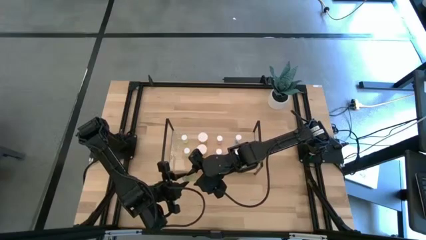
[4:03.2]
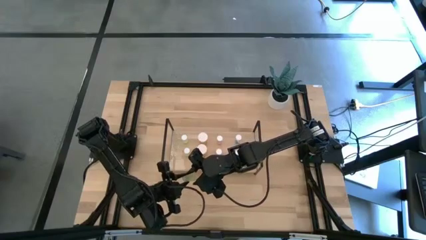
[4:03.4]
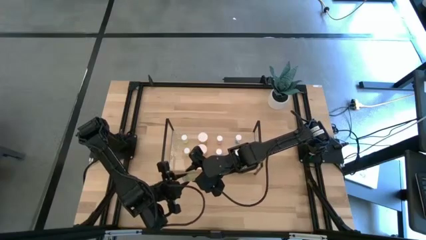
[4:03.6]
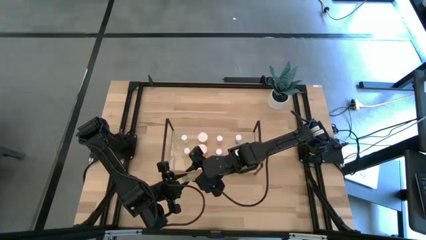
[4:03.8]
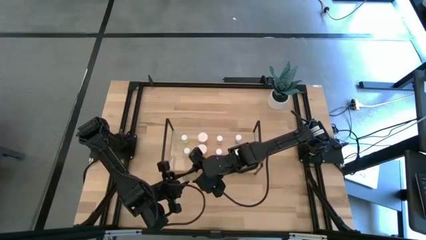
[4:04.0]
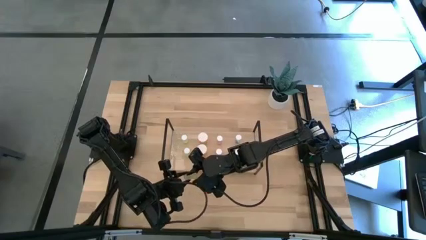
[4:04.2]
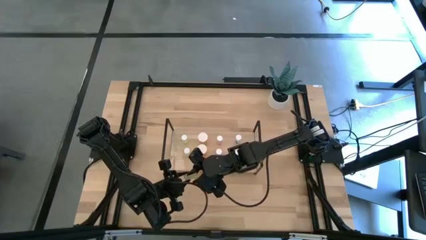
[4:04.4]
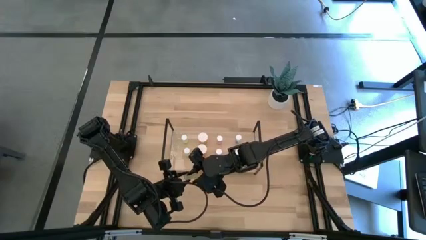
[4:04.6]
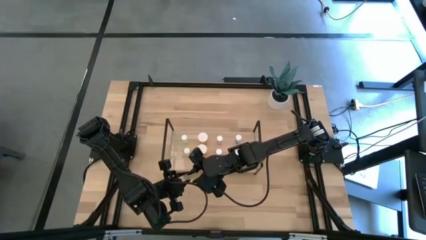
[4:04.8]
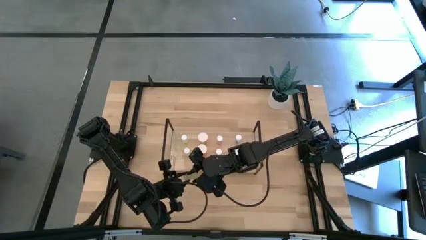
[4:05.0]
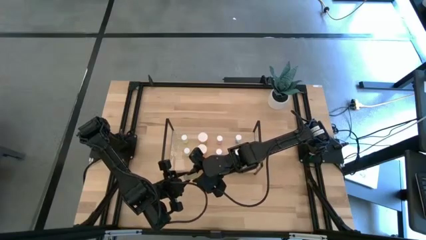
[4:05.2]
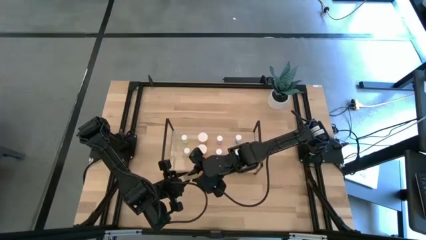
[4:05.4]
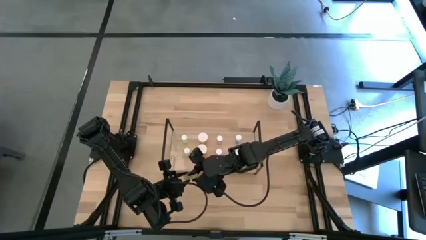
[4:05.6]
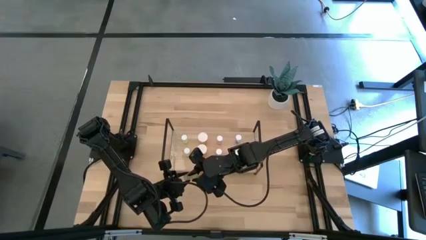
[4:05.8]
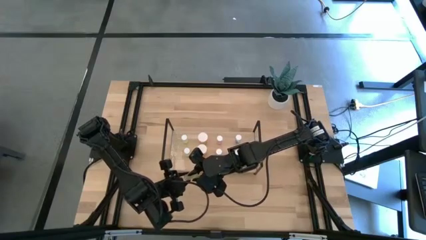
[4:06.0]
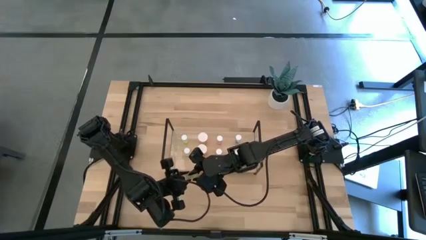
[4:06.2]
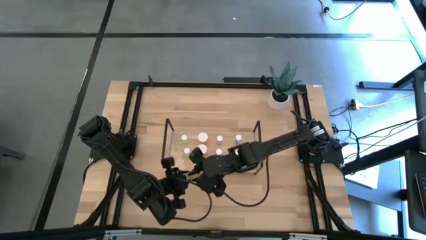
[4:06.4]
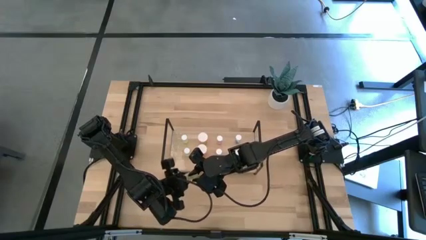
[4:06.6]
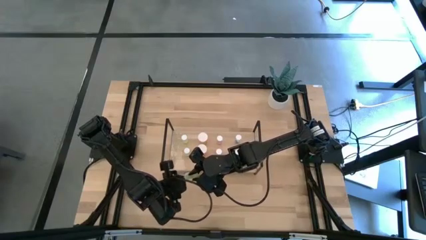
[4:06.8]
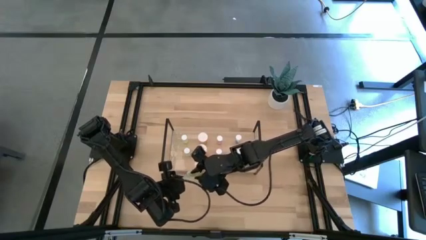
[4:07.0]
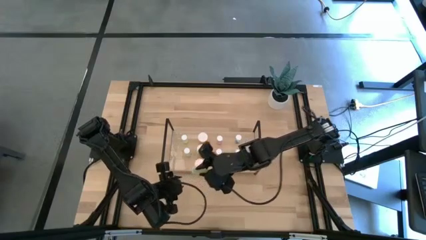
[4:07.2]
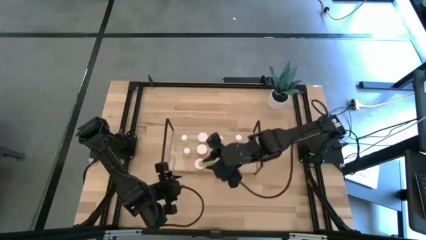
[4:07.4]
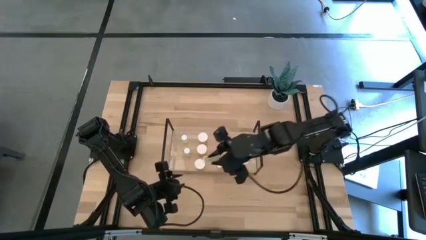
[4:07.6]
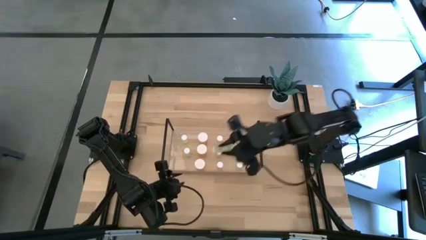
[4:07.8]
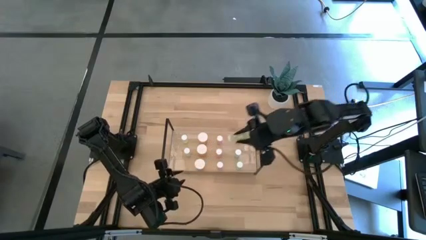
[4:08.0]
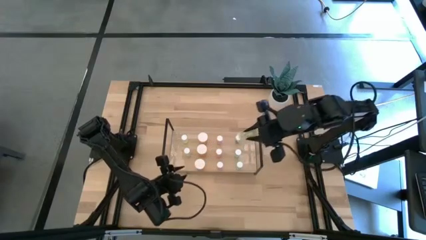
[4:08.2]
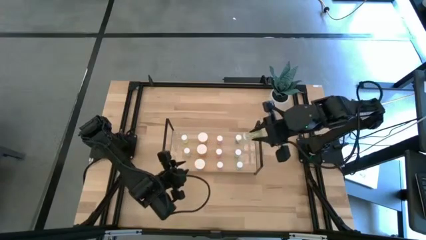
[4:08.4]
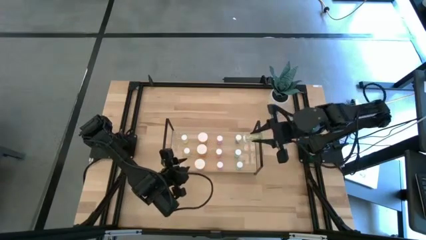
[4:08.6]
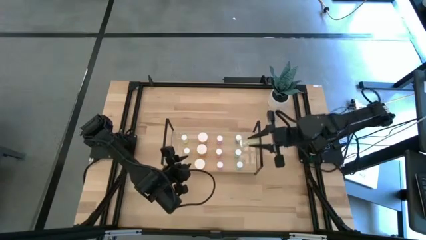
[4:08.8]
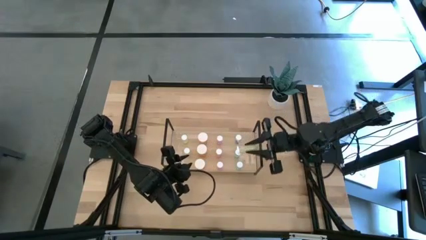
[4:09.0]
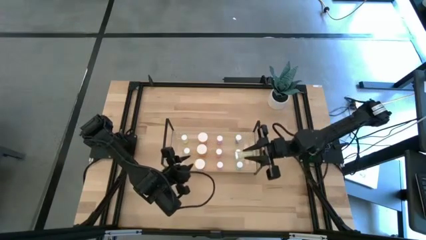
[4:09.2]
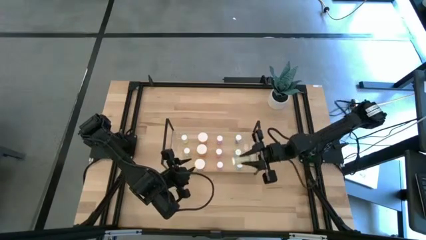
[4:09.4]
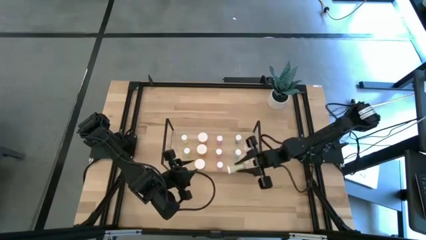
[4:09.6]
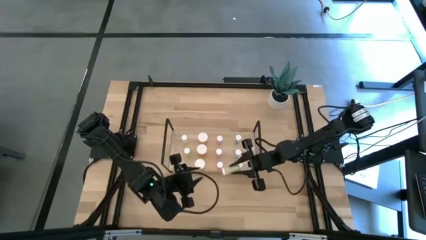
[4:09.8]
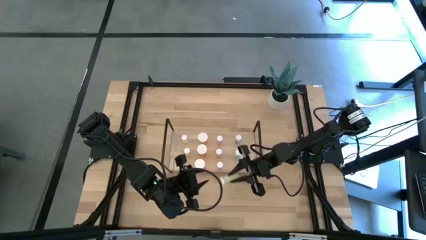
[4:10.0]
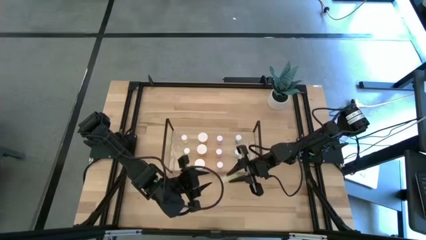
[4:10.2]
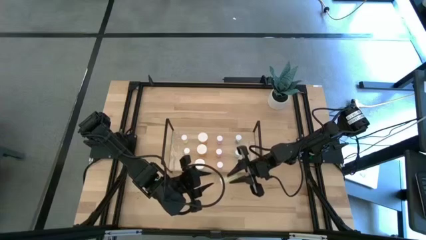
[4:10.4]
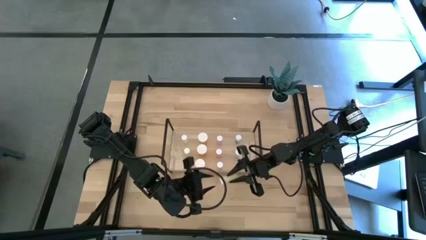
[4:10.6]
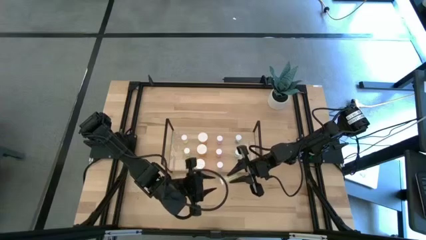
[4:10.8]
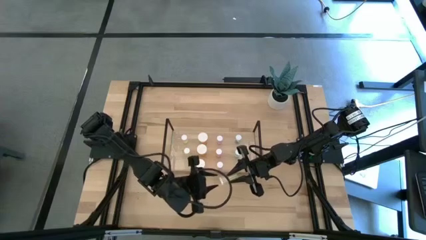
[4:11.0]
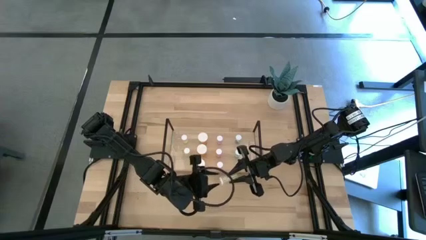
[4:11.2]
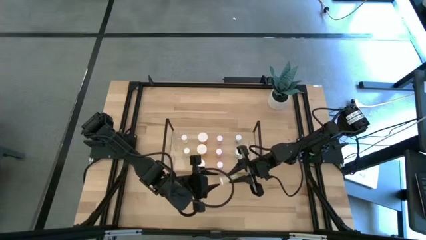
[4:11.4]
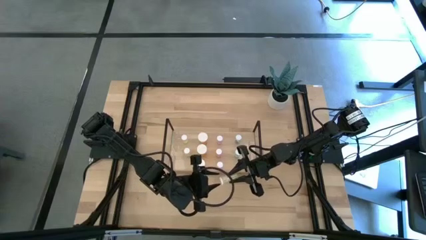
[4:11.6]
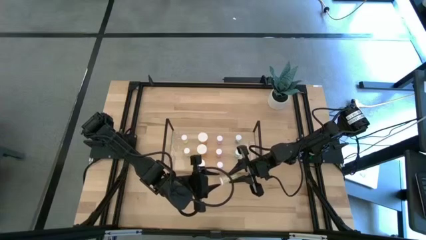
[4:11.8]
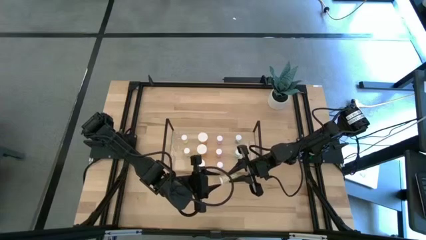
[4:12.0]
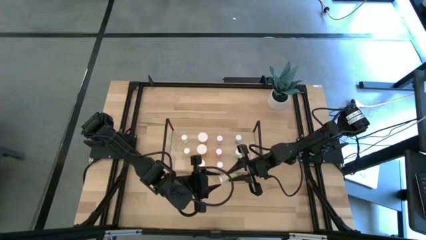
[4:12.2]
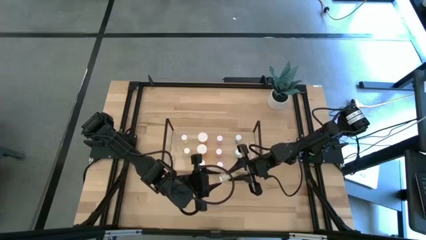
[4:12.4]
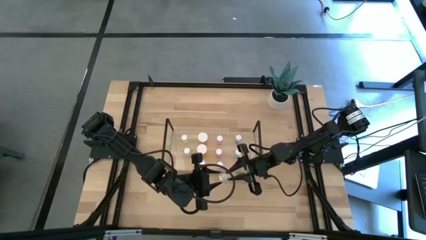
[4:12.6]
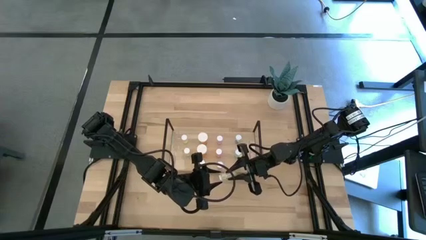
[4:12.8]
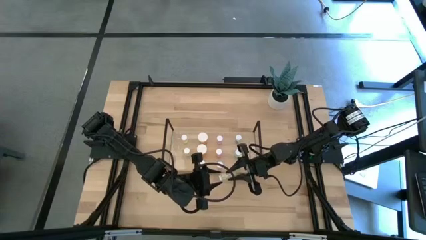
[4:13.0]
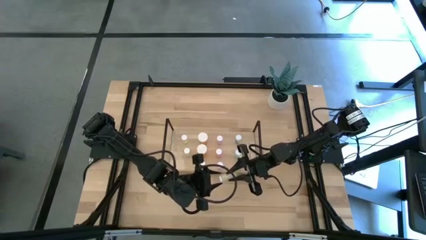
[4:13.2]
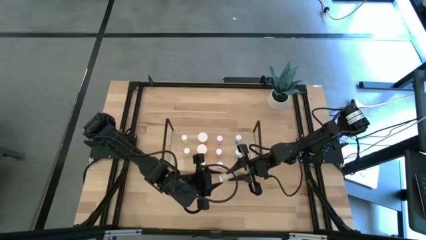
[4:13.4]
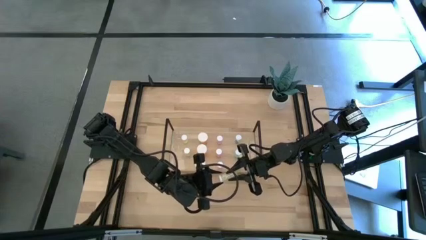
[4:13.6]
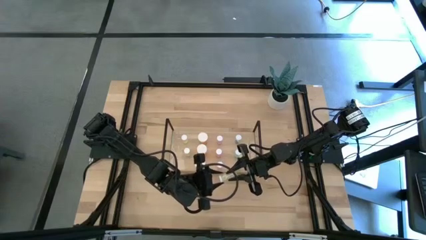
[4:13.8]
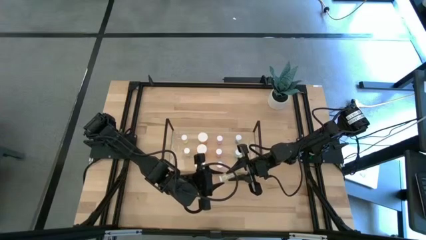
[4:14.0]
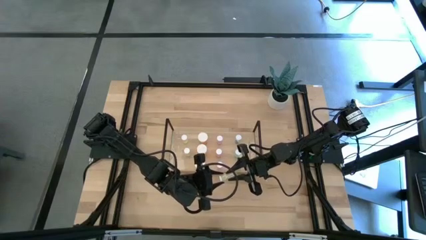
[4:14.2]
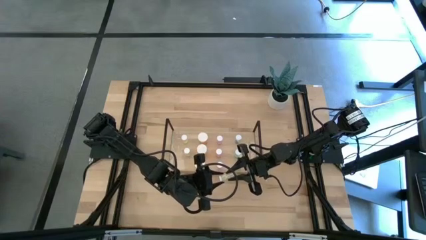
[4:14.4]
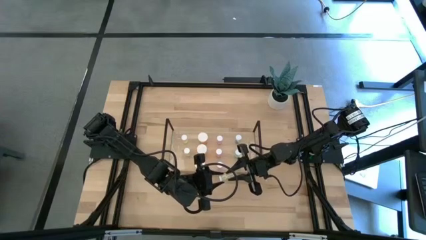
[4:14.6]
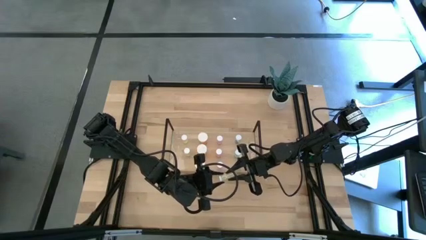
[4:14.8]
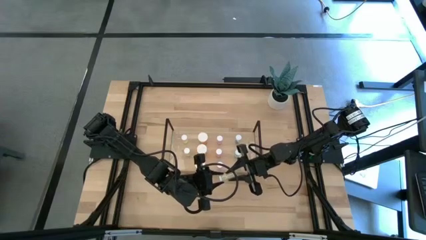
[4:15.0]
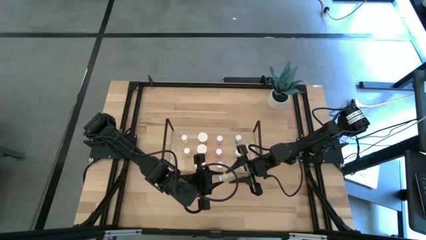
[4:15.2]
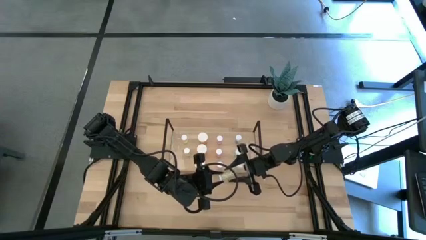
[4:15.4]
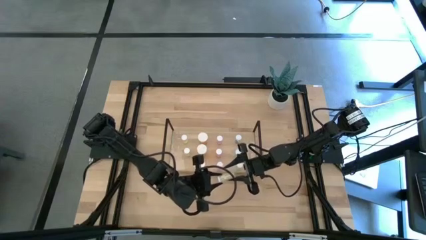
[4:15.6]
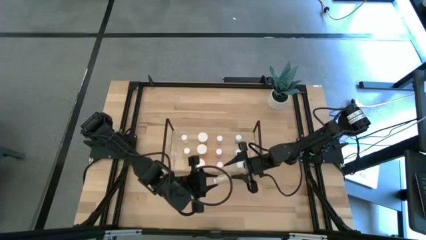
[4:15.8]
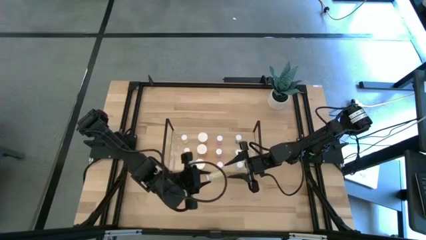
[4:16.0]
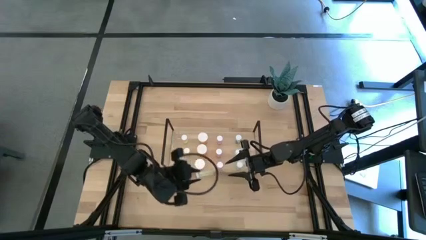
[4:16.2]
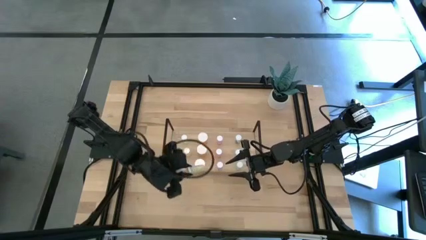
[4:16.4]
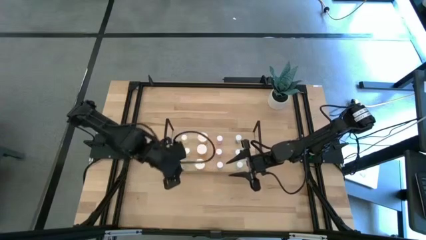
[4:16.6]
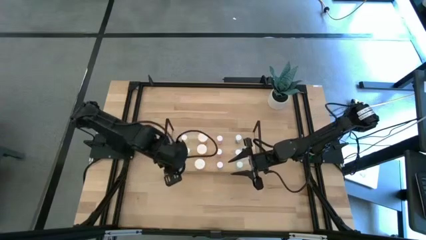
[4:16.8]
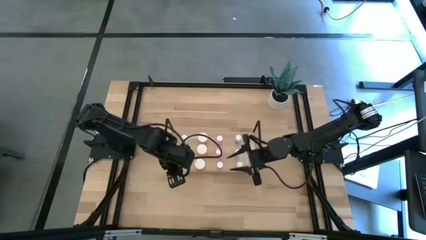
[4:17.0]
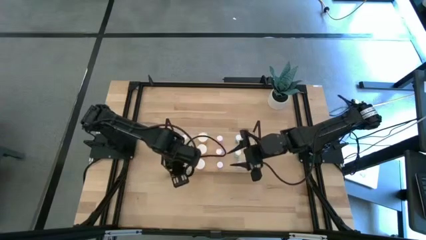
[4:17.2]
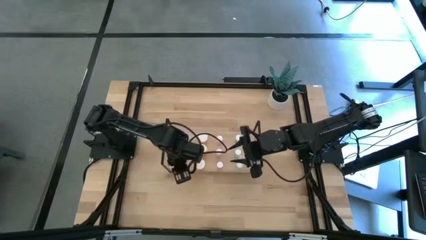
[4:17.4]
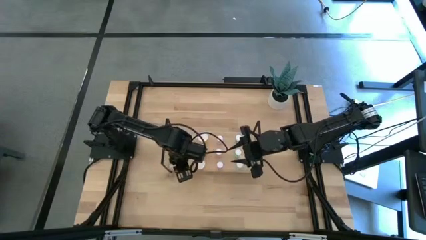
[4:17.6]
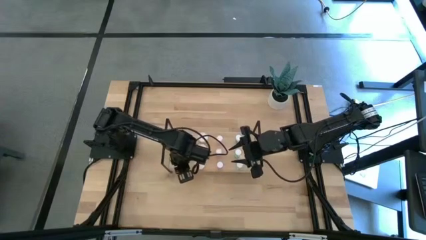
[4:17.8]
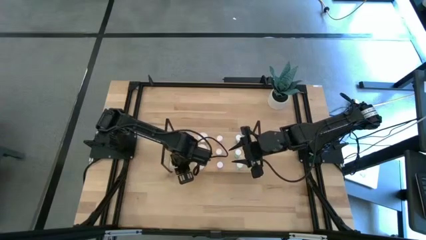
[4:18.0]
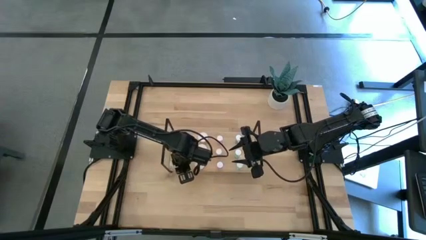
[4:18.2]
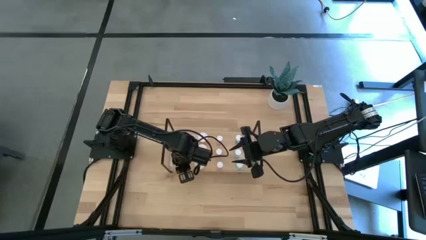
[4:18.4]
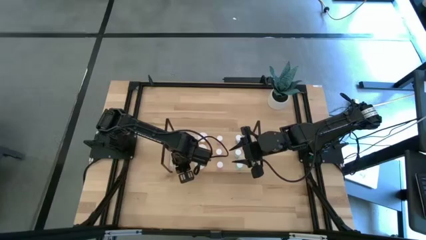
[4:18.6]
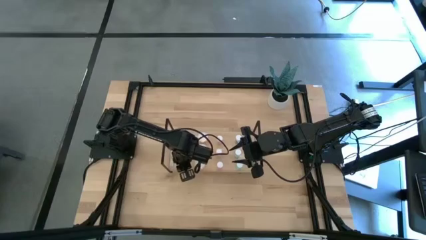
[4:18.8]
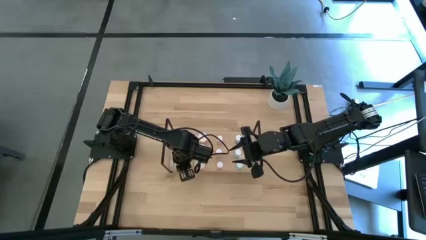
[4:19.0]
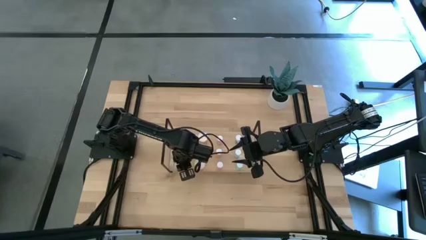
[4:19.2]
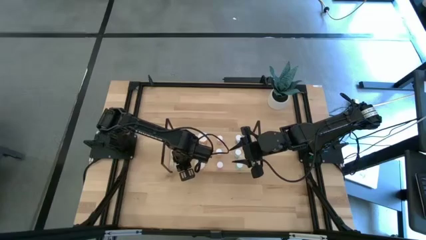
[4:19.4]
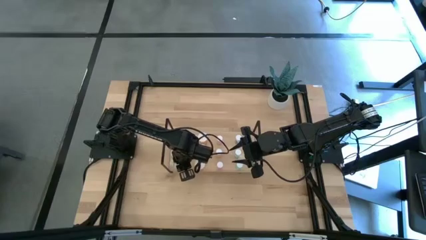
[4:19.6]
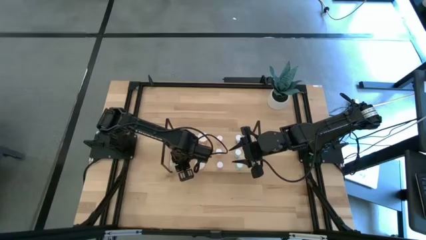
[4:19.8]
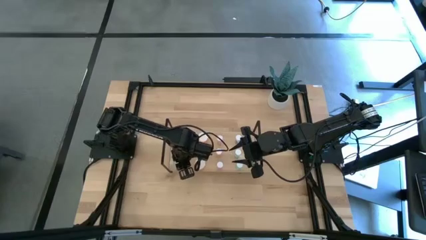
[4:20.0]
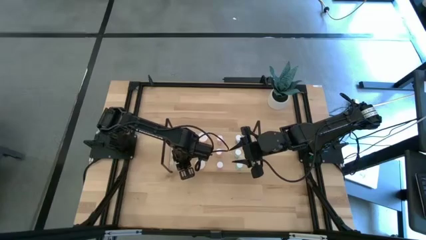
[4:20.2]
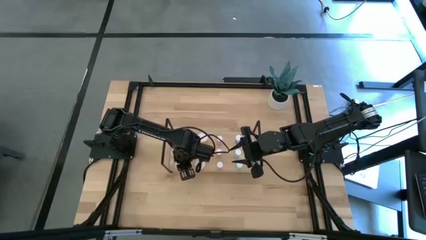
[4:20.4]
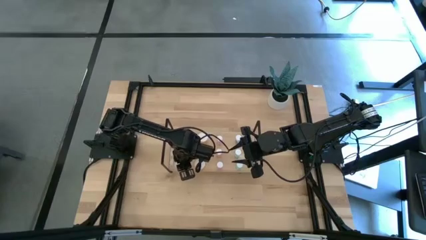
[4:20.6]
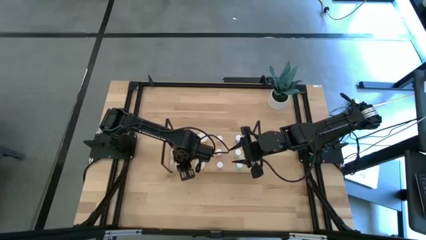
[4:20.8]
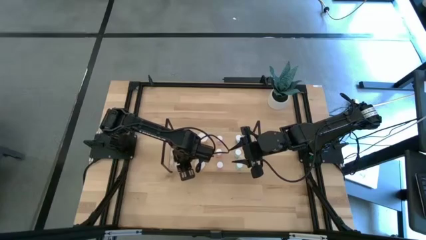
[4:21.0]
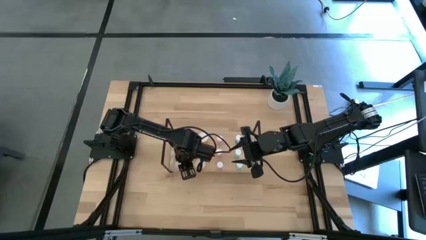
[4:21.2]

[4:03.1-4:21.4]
Task: Pick and place medicine bottles onto shelf by color
Put the yellow pill bottle aligned with the yellow pill bottle on the shelf
